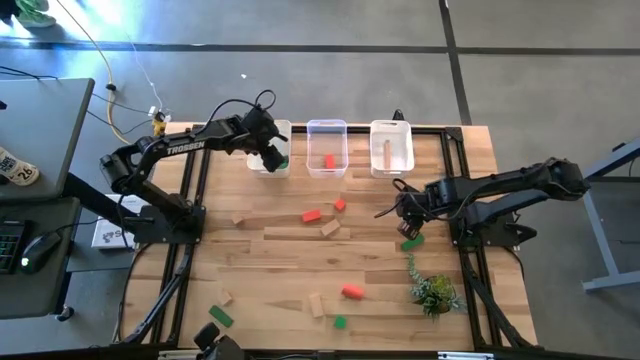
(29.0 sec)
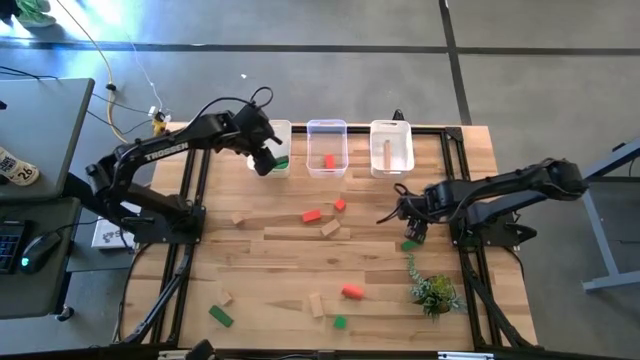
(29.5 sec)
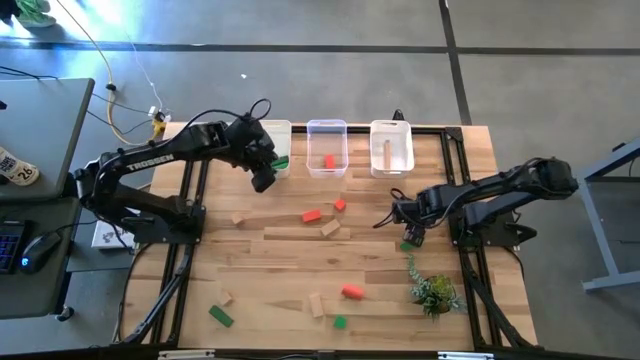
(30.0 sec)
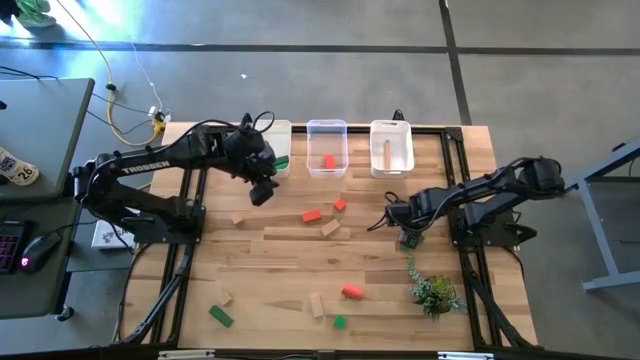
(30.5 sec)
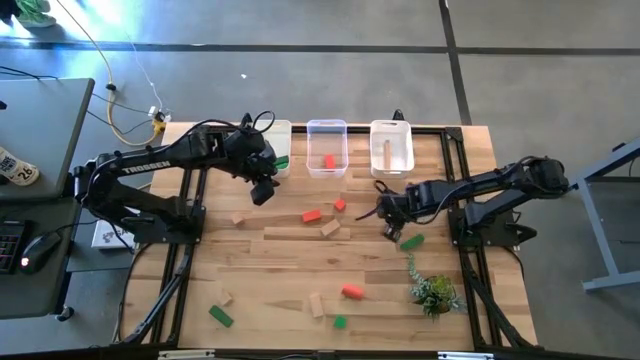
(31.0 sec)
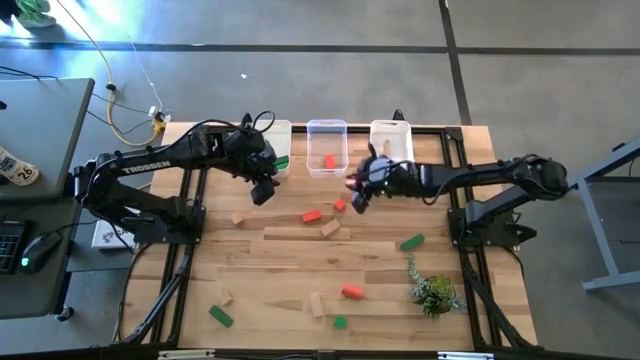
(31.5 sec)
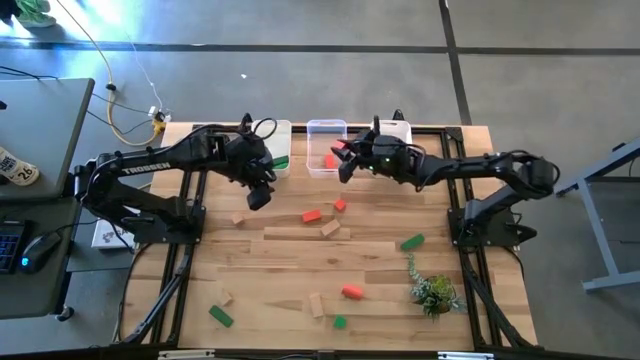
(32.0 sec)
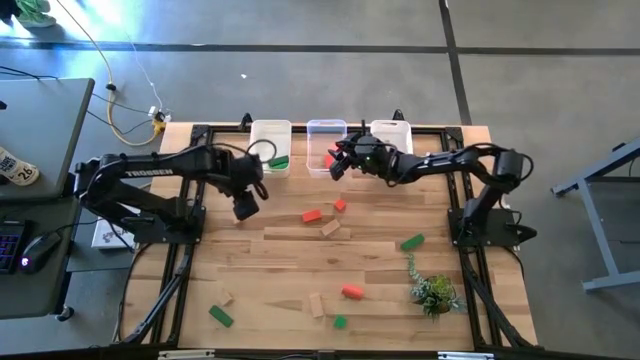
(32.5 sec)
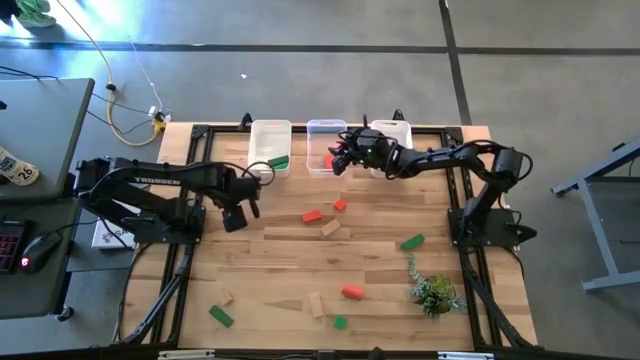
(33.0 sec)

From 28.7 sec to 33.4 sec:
Task: Sort & place blocks by color
Put the orange block into the transparent bin

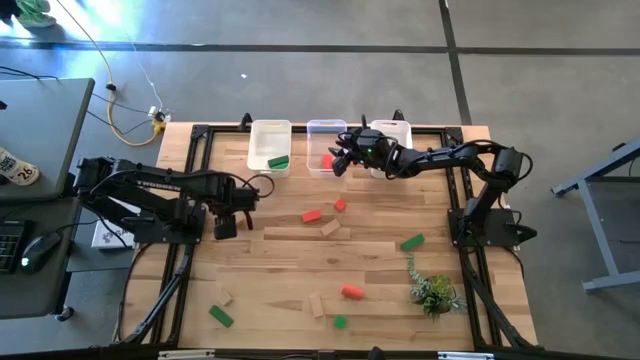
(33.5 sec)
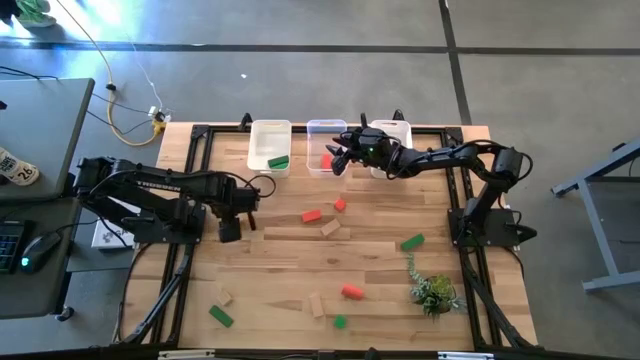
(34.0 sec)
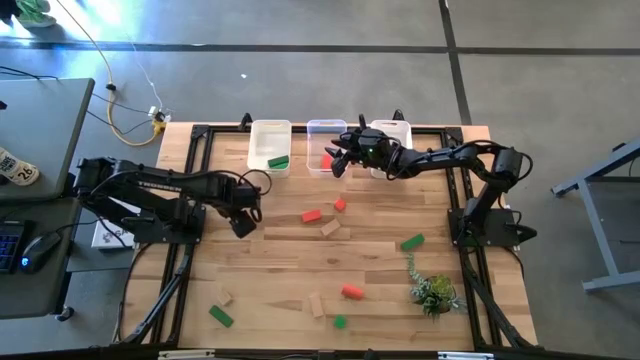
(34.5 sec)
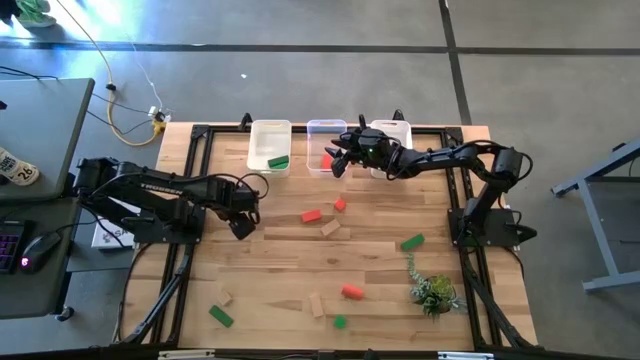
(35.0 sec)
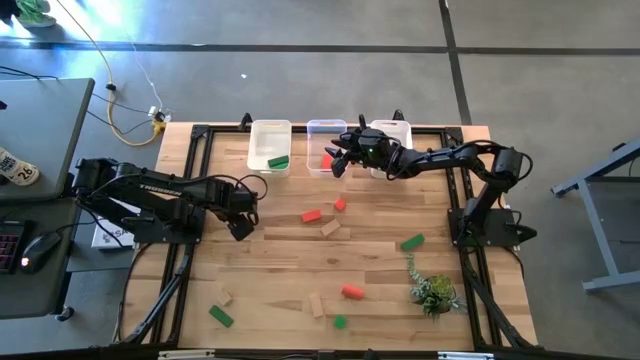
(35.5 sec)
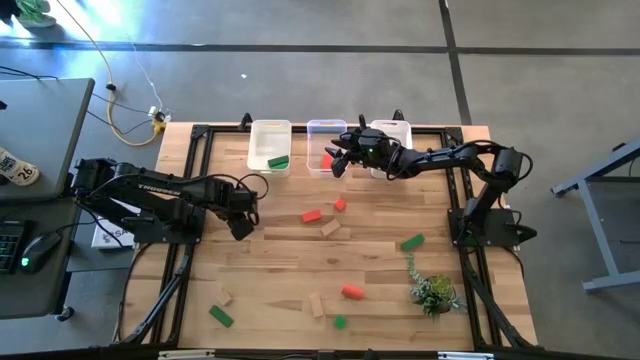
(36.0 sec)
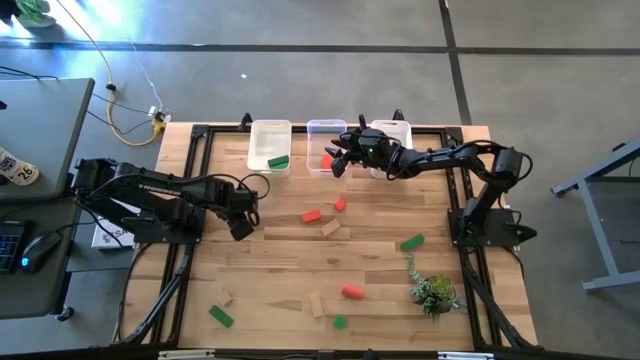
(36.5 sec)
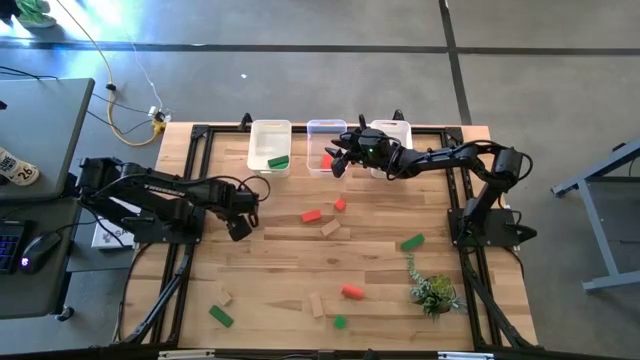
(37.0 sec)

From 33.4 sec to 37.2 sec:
Put the brown block into the right white bin

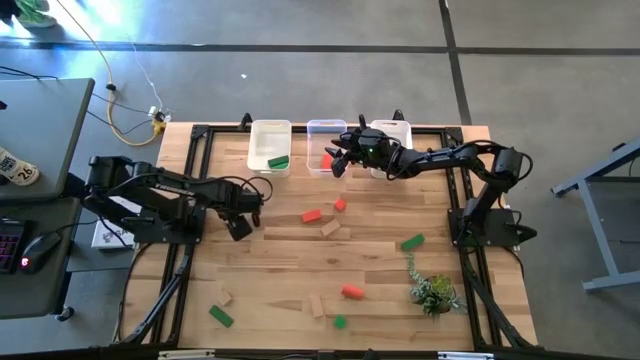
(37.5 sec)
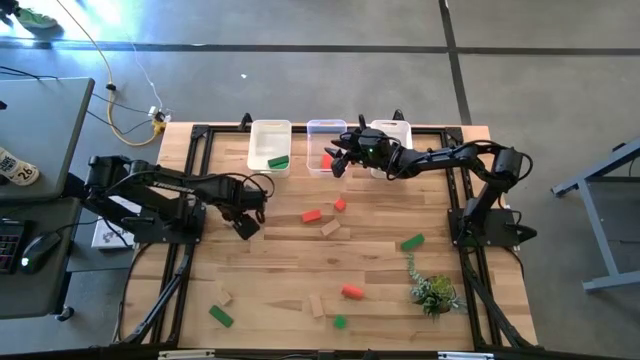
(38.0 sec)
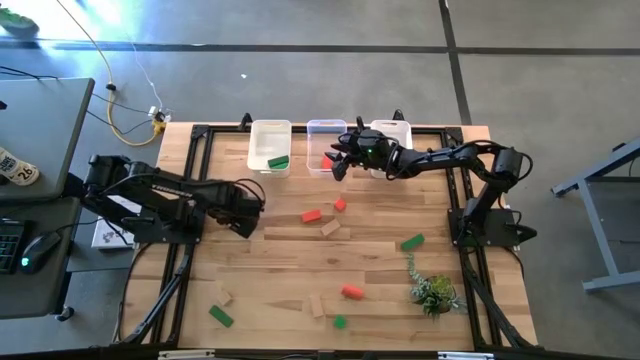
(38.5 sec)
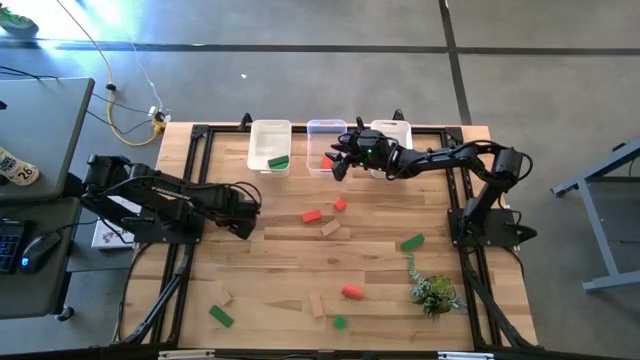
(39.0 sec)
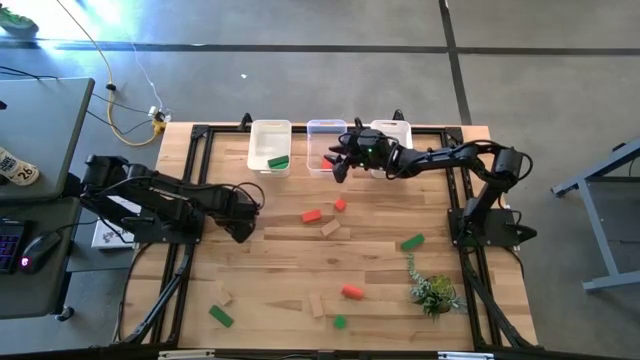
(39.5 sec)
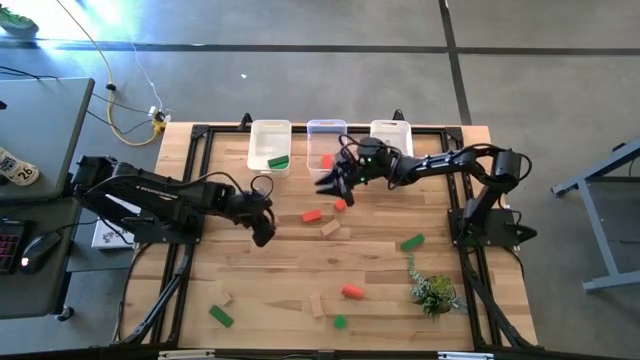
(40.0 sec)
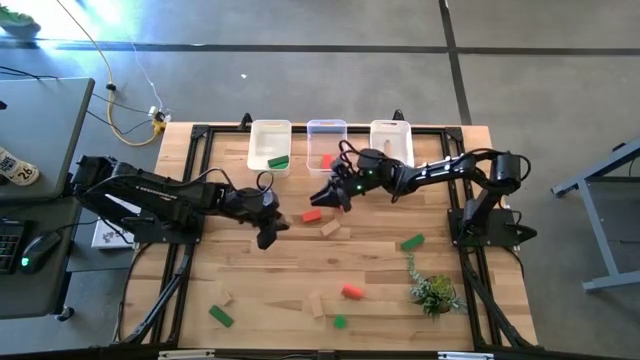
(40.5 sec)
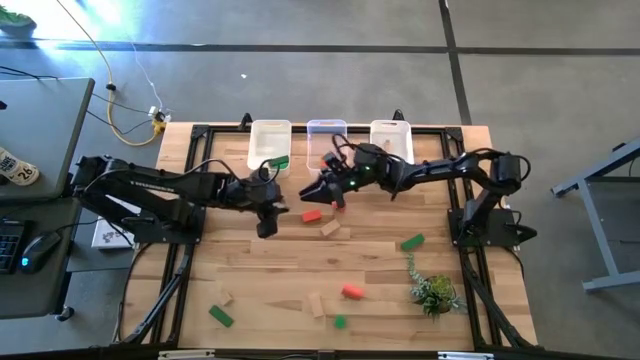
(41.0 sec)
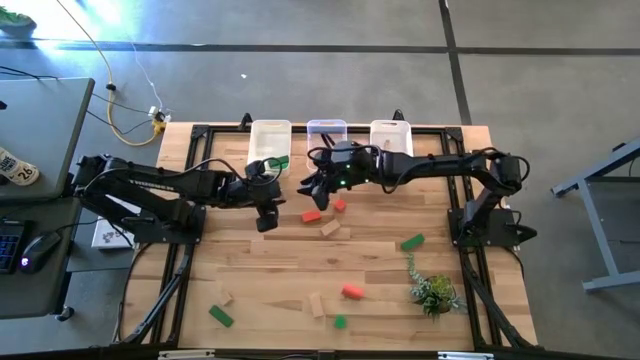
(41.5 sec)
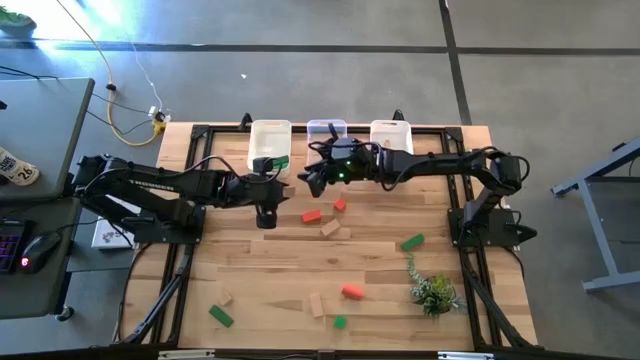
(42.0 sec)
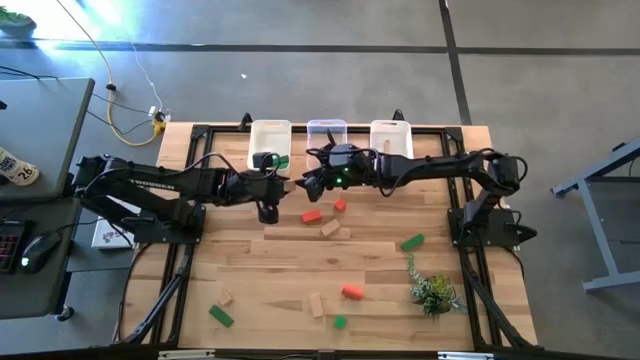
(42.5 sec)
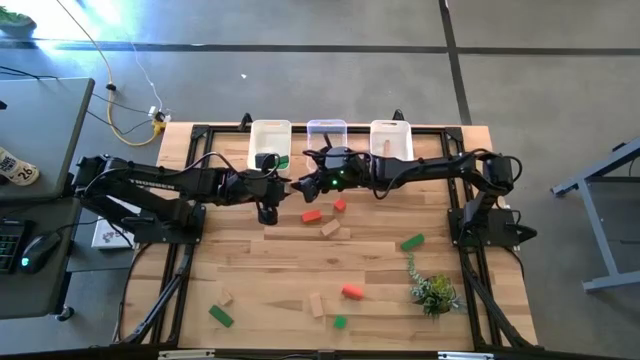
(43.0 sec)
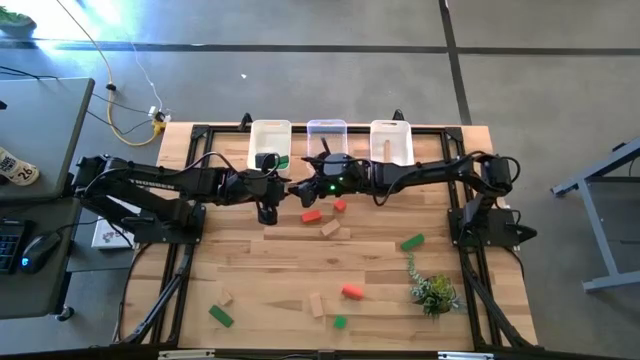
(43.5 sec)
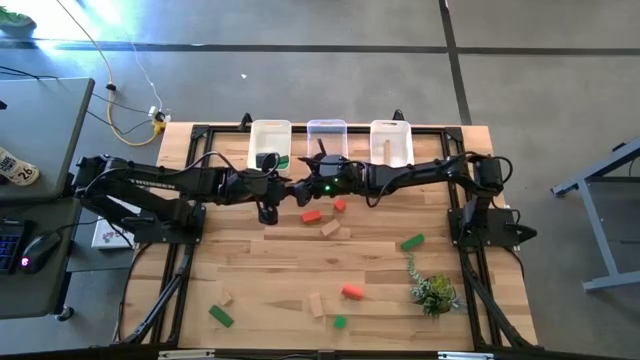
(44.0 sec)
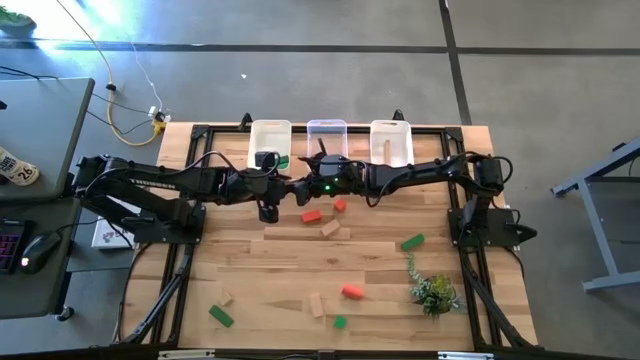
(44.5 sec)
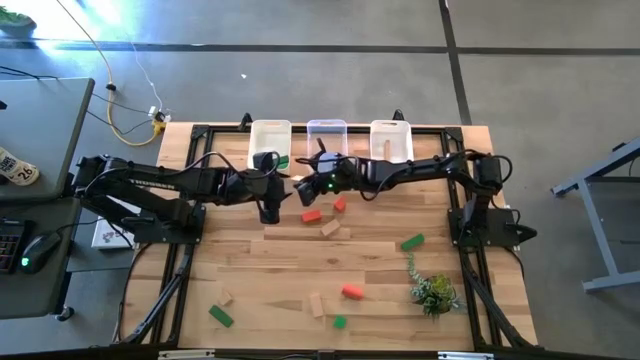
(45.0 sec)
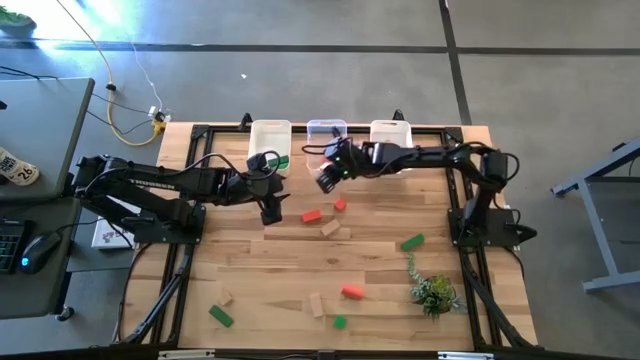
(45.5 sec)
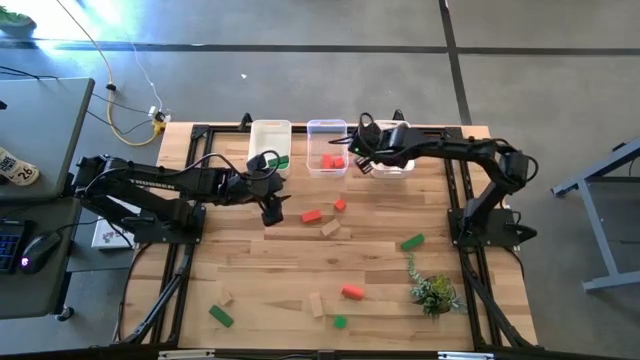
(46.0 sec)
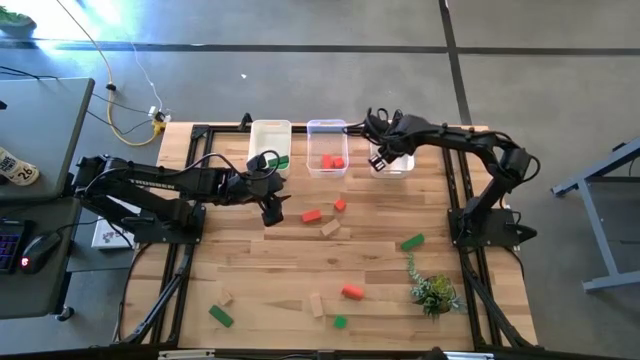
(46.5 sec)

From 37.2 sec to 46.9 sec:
Put the brown block into the right white bin

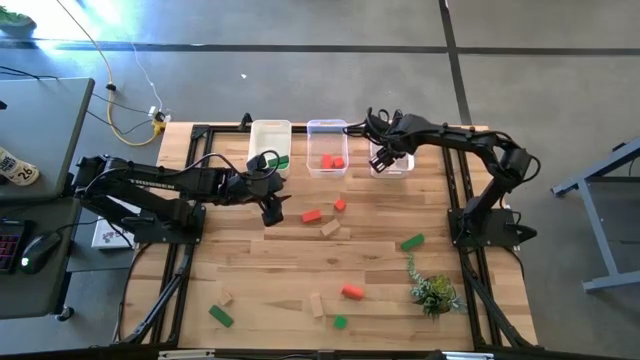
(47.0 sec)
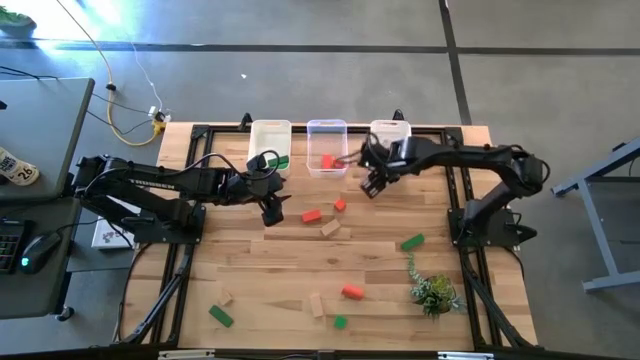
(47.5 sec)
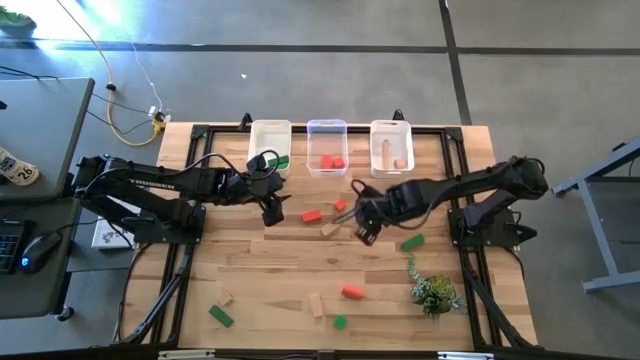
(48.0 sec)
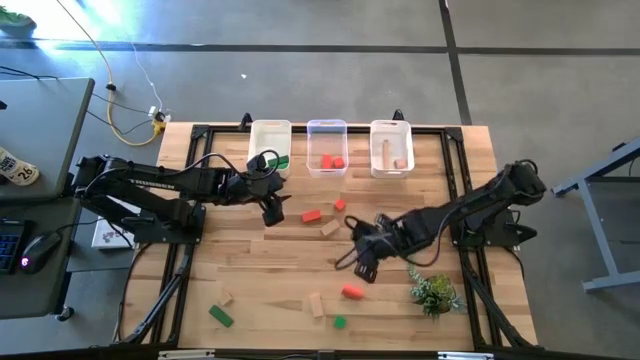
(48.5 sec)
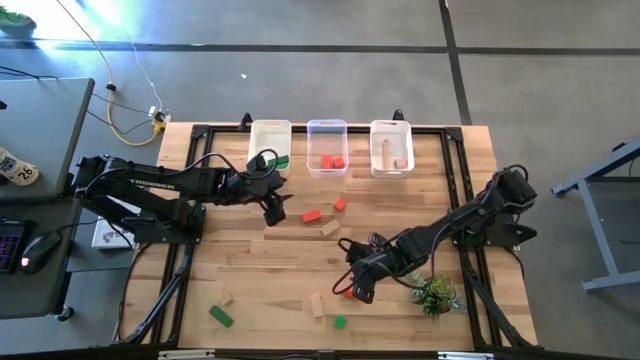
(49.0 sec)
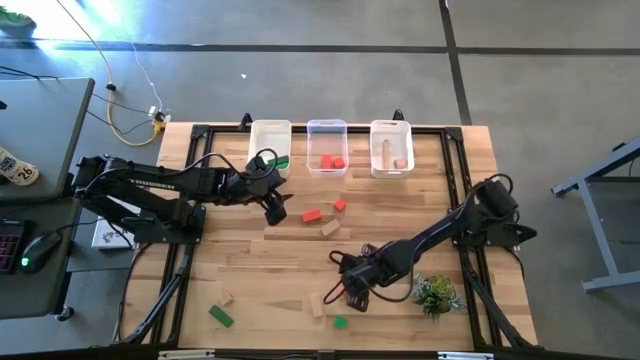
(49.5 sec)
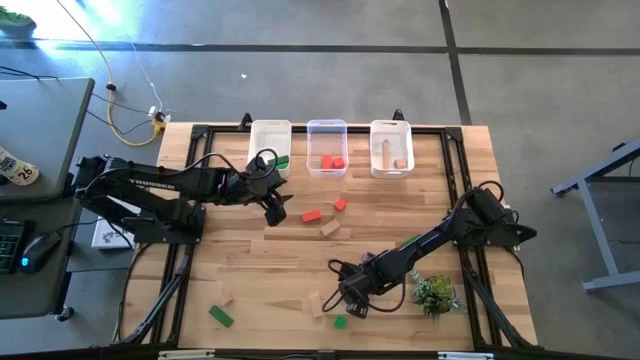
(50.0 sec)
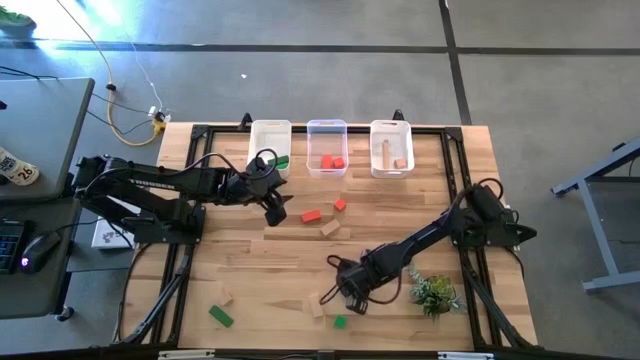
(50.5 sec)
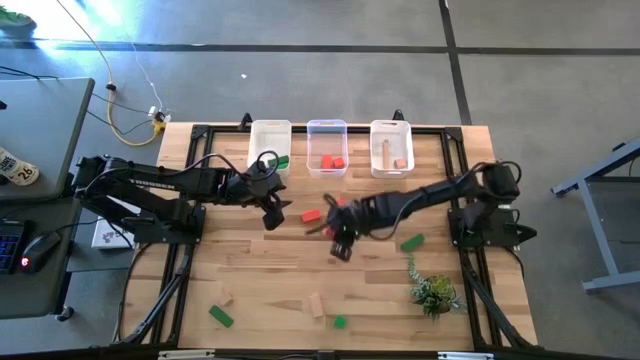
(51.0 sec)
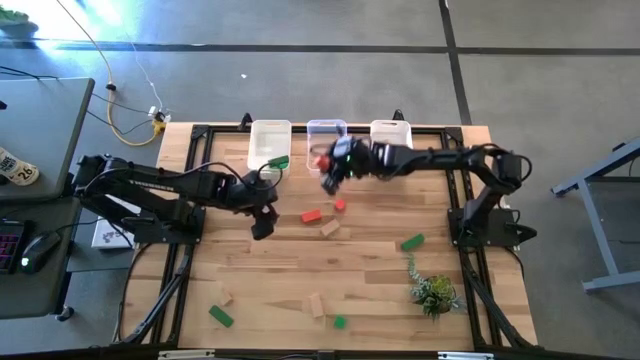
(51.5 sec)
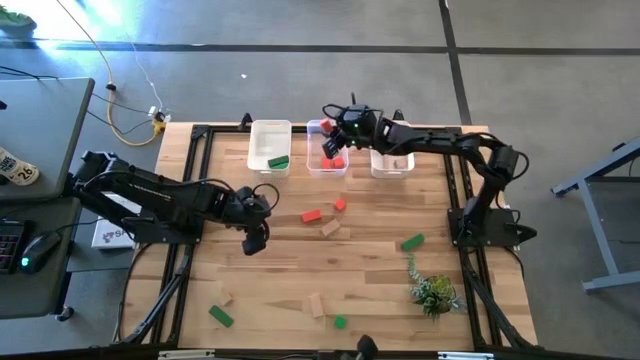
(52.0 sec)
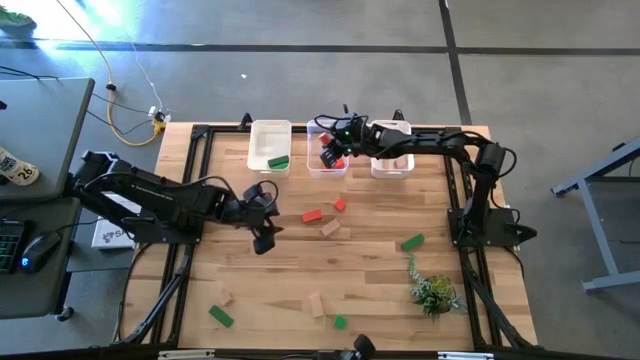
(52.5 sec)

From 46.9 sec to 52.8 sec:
Put the orange block into the transparent bin
